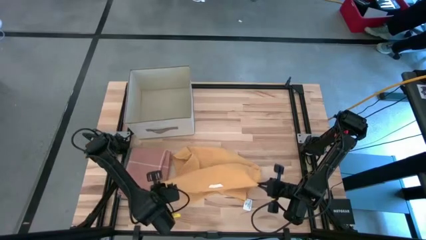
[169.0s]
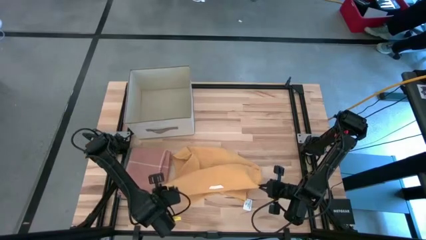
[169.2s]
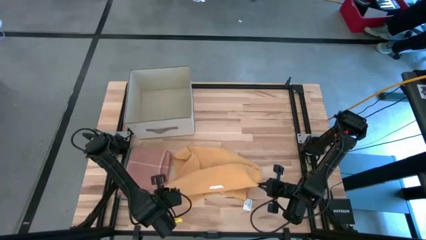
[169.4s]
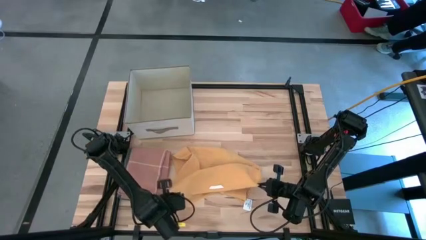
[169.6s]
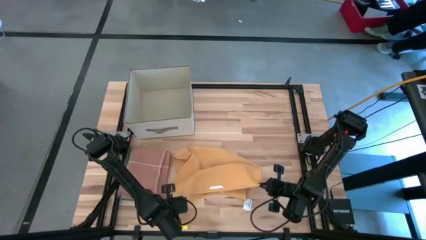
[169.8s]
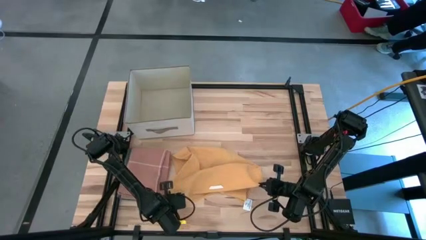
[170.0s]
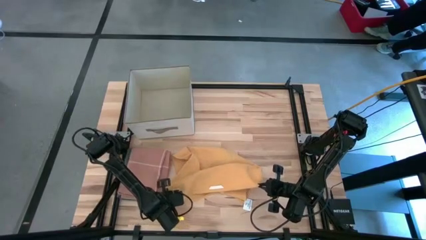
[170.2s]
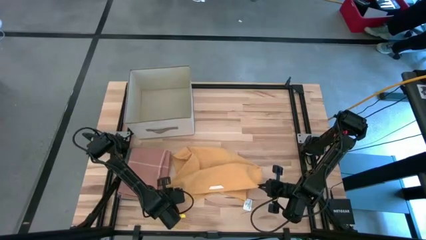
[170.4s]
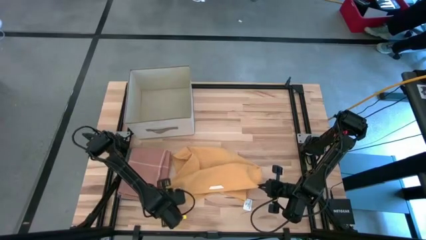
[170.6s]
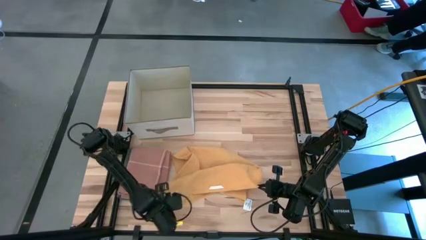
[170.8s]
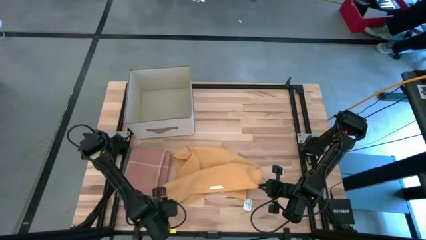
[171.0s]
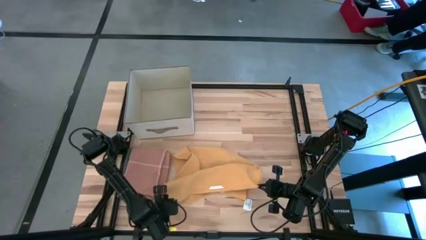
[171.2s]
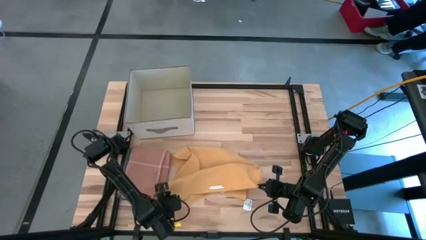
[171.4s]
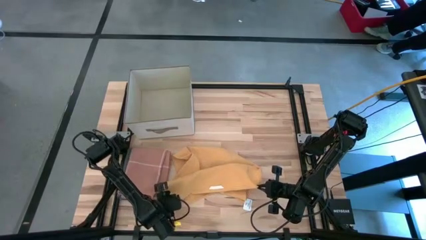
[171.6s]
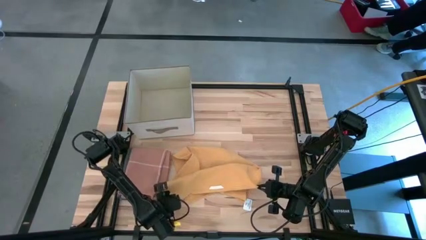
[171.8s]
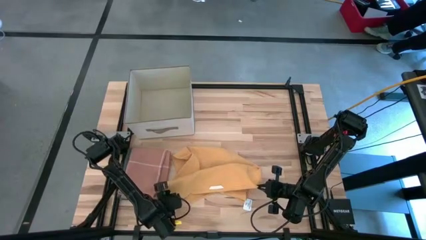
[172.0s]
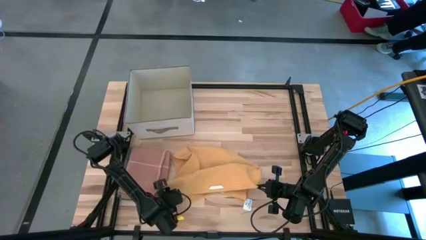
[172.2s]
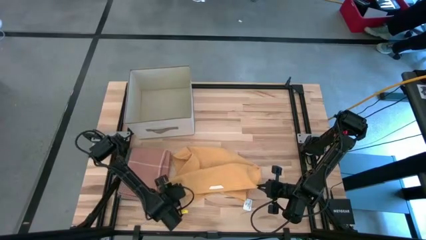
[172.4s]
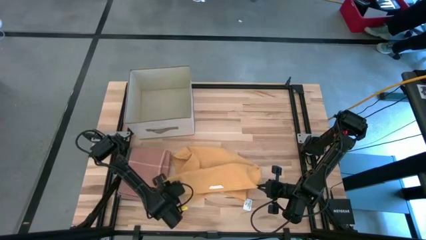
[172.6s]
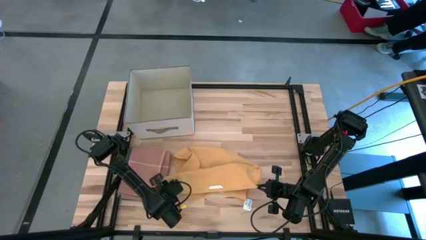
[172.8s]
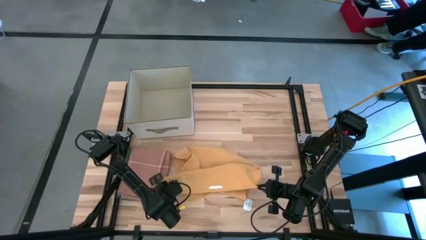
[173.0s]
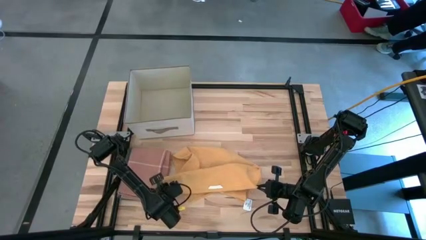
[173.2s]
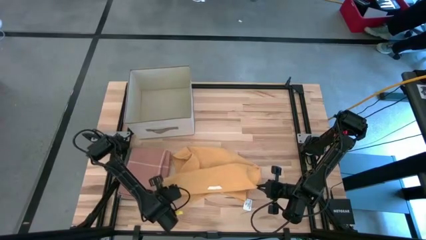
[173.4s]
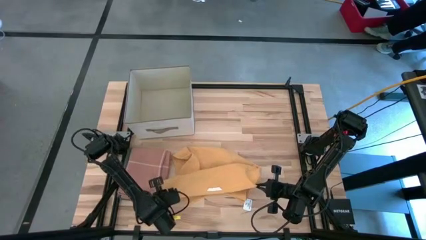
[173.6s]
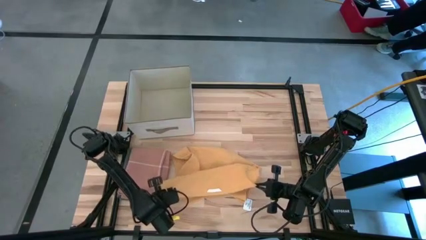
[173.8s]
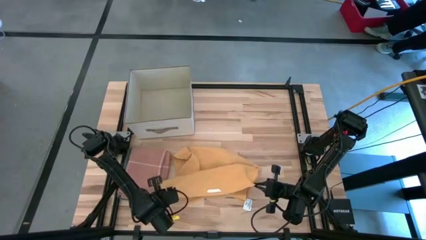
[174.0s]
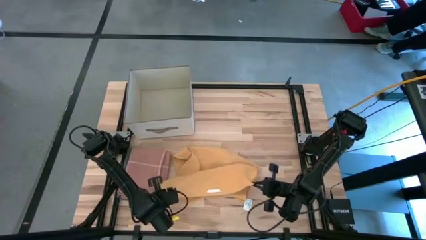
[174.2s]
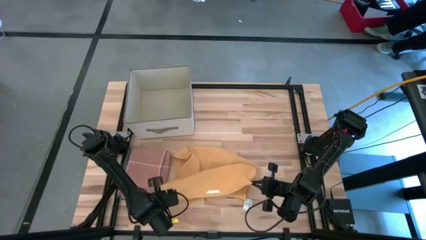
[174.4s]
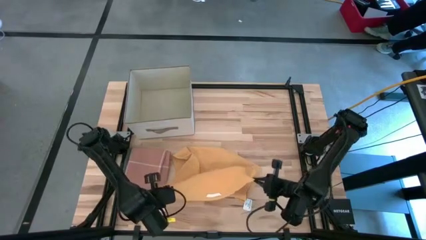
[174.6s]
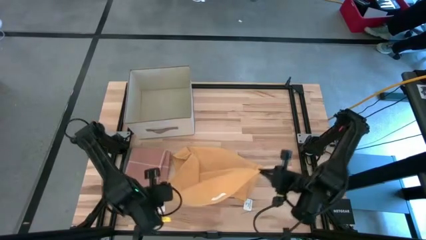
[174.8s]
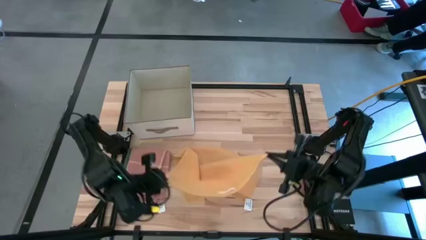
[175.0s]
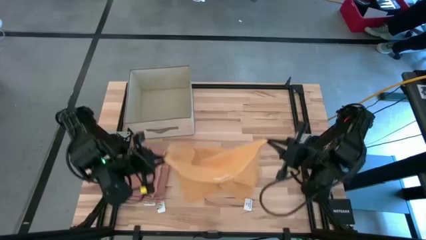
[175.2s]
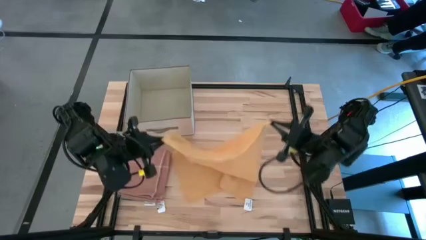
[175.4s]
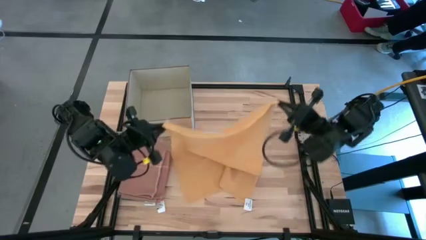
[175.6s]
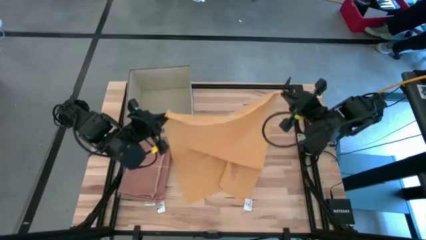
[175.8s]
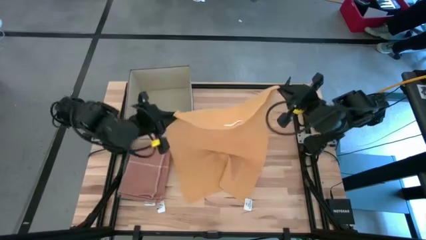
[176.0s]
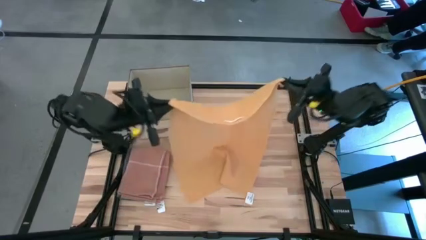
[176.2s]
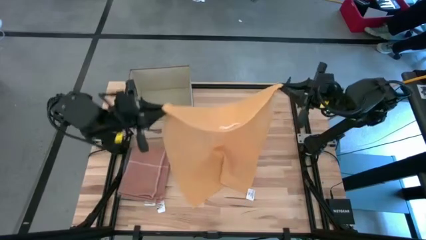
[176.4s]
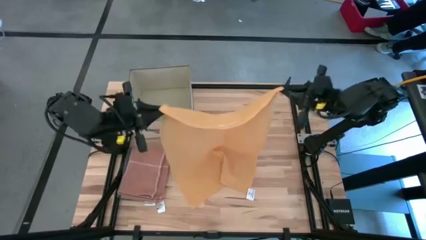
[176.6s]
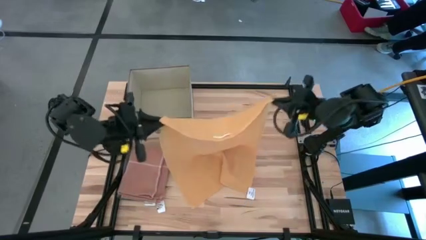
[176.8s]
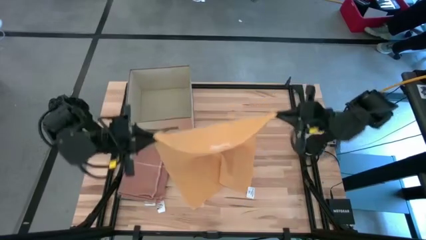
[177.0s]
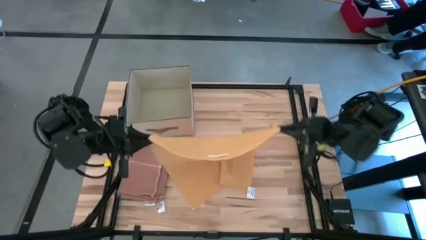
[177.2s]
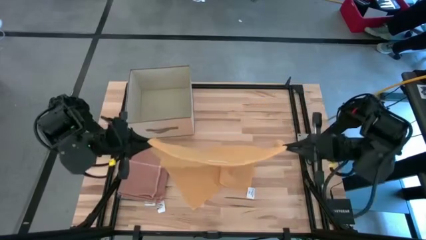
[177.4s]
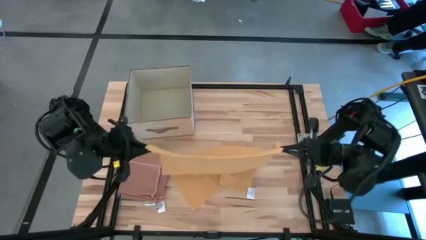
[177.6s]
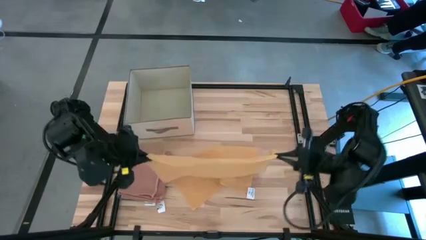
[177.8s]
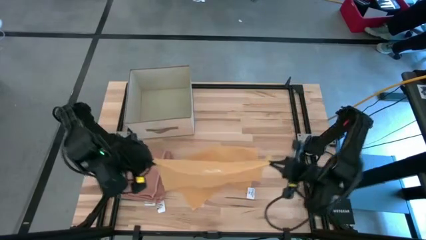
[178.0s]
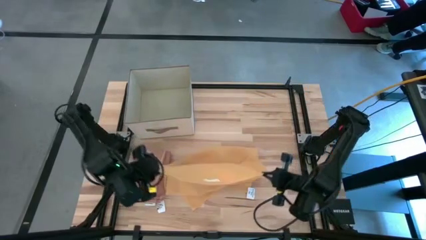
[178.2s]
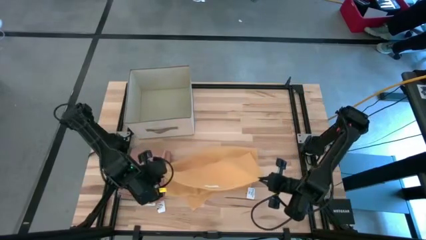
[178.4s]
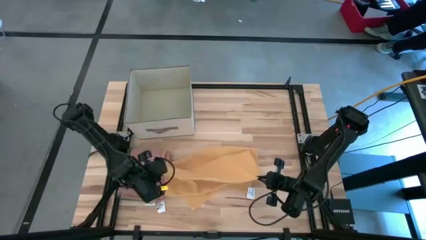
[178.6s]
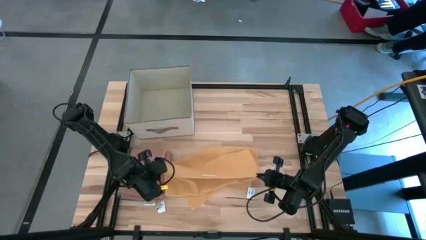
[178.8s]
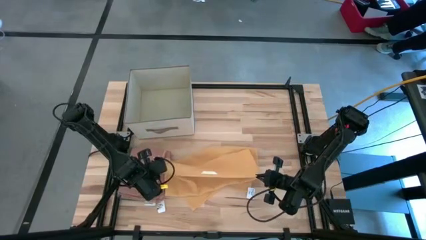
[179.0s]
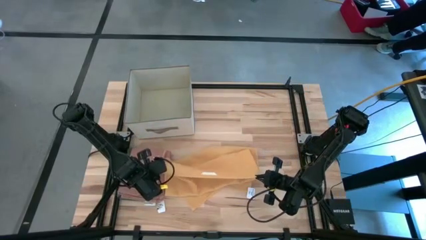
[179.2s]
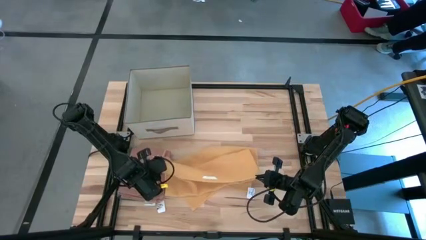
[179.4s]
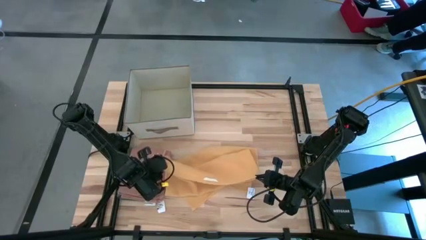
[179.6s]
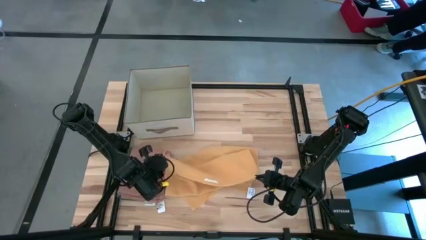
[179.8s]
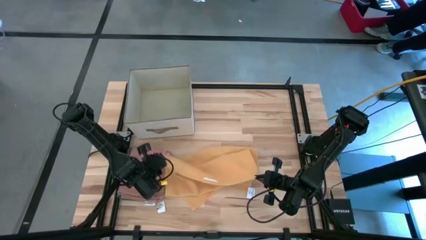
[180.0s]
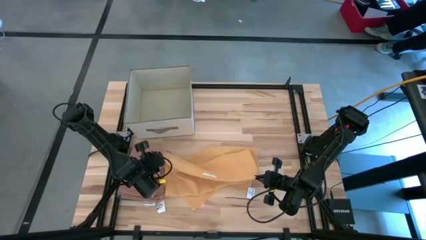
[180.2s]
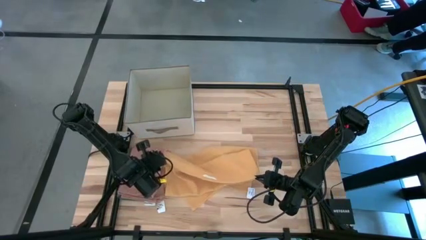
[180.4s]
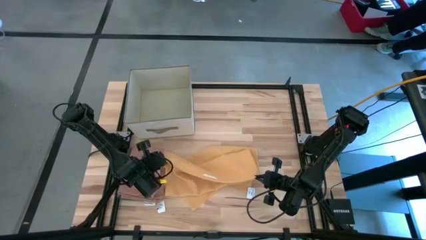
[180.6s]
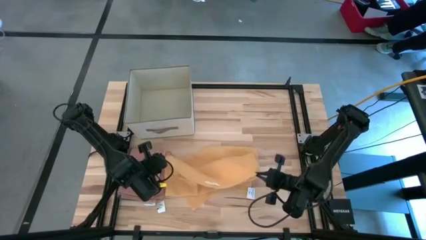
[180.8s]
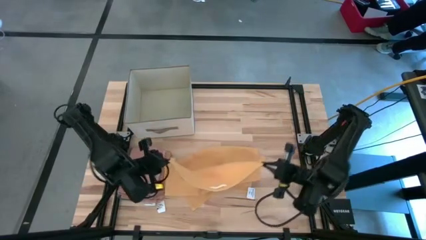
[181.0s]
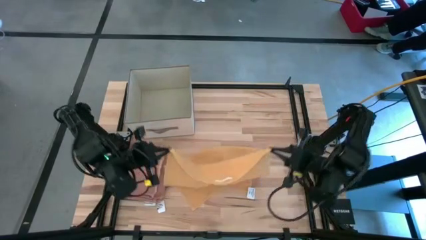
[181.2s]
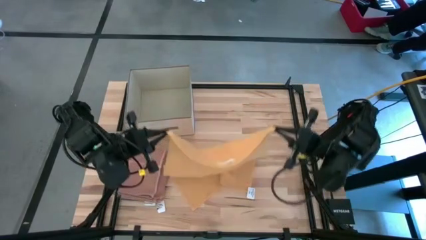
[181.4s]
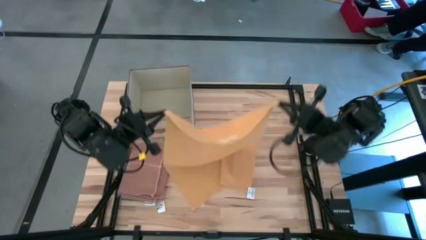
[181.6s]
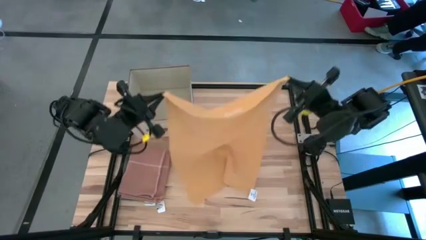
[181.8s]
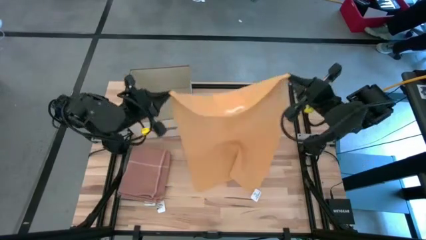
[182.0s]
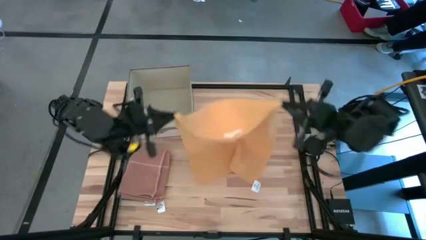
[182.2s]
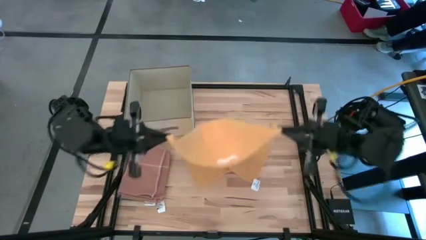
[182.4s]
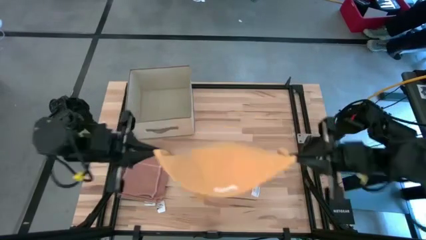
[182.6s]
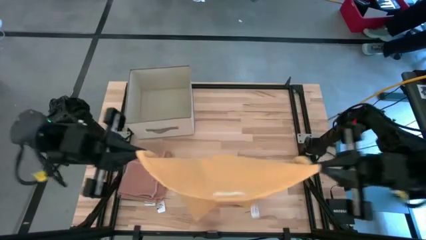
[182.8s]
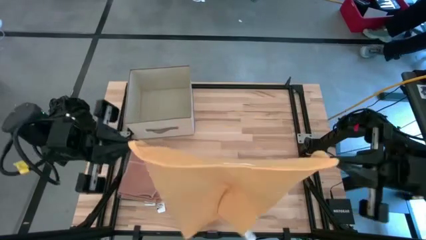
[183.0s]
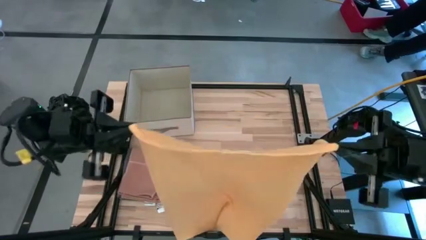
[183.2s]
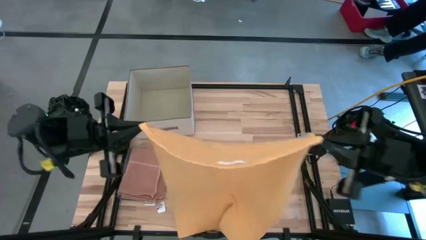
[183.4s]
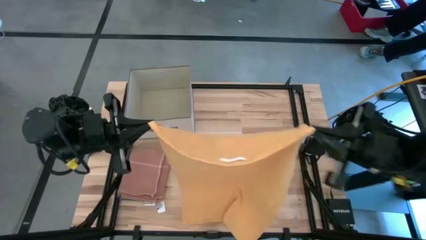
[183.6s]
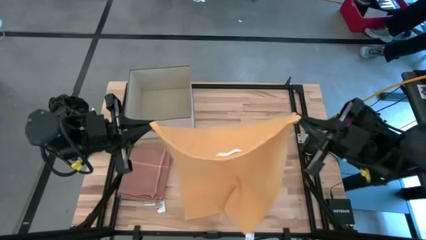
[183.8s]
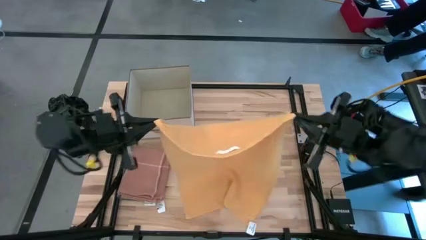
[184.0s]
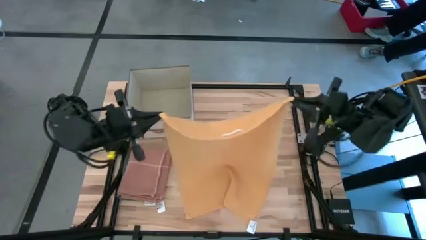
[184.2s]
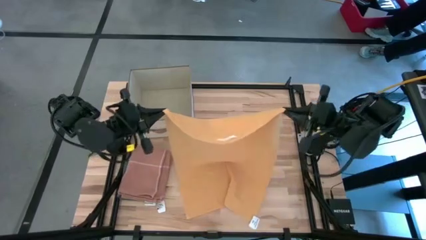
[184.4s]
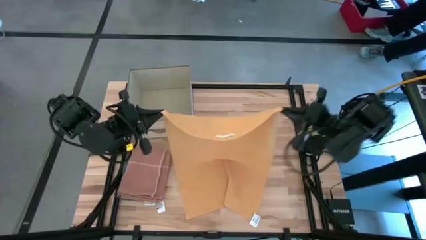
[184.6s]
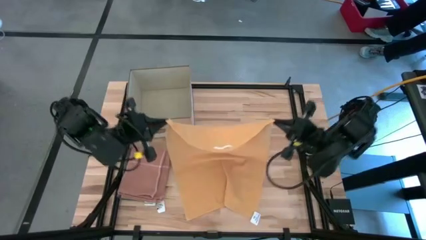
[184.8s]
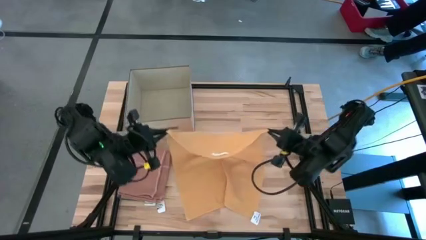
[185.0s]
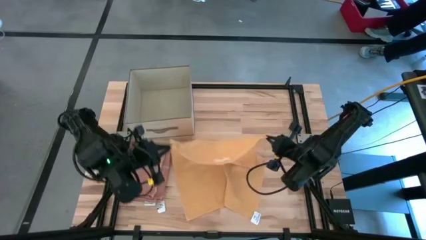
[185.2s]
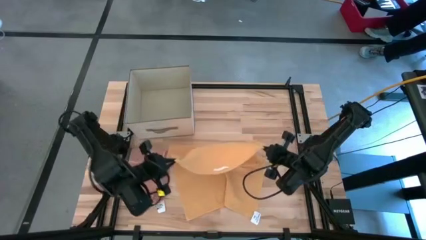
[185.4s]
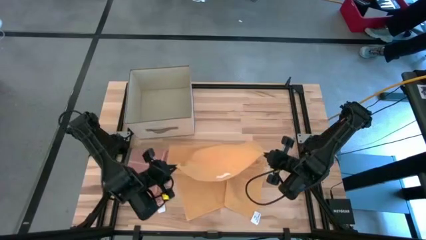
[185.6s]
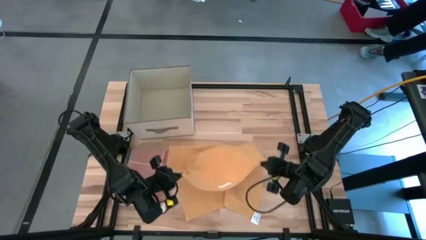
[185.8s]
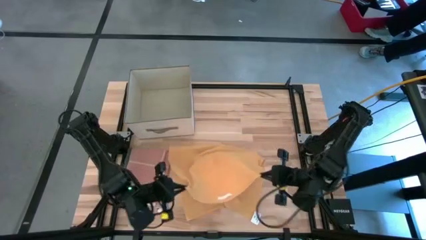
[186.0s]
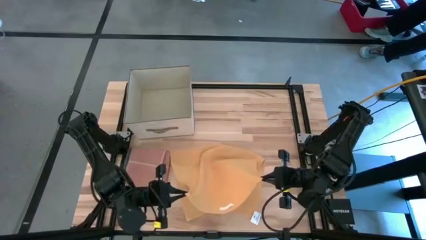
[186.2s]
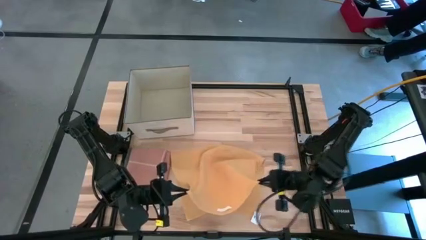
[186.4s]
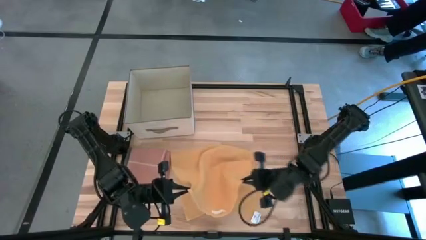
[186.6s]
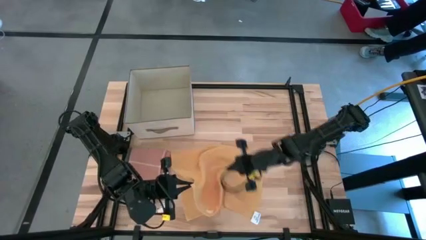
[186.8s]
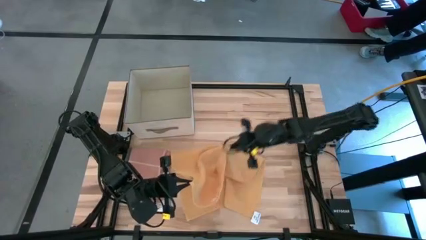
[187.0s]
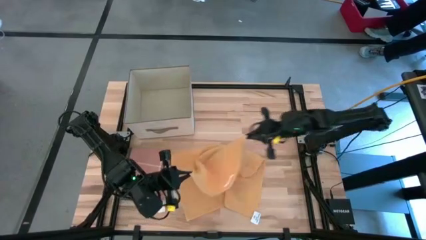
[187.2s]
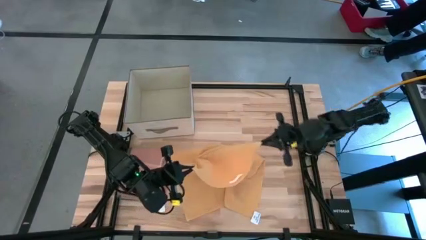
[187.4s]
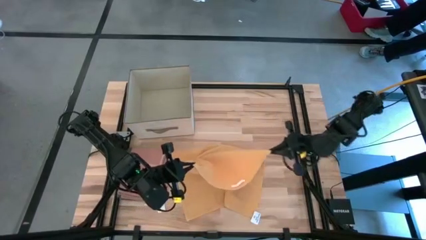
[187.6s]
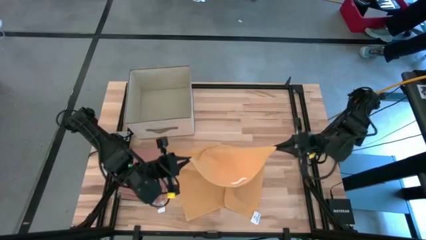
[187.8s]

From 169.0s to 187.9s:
Task: Fold towel
Fold the yellow towel
